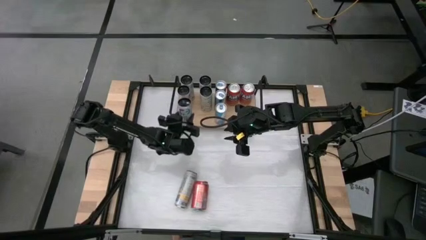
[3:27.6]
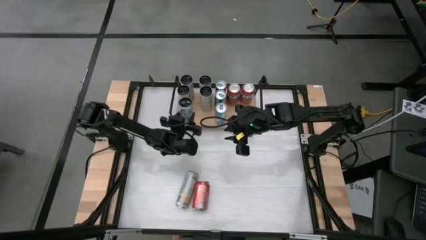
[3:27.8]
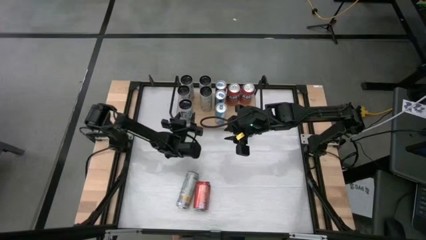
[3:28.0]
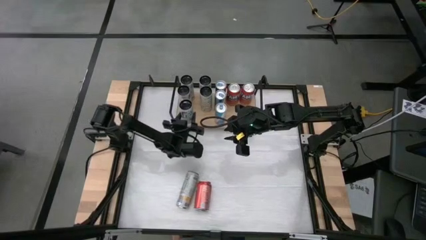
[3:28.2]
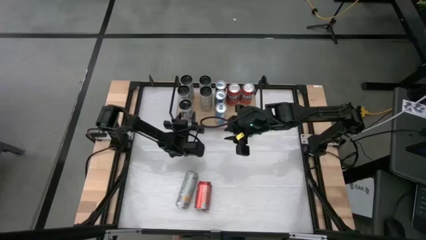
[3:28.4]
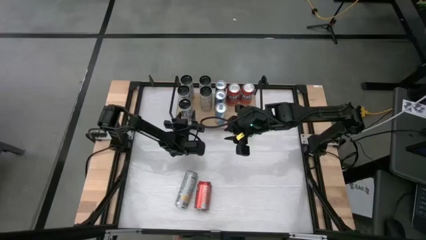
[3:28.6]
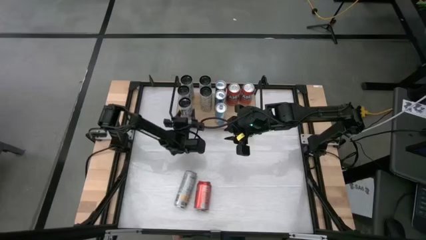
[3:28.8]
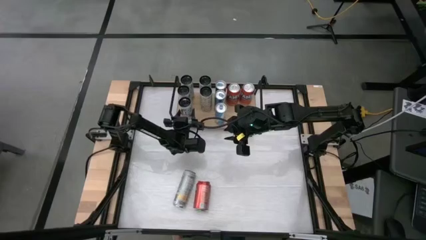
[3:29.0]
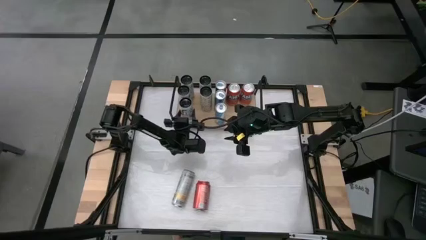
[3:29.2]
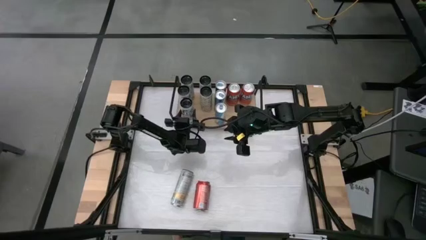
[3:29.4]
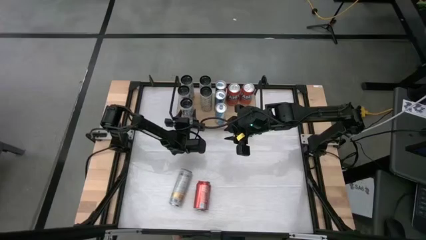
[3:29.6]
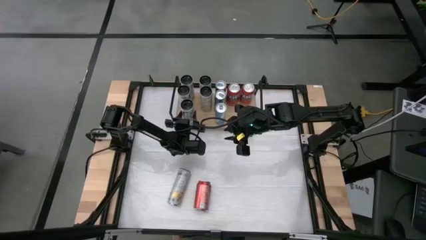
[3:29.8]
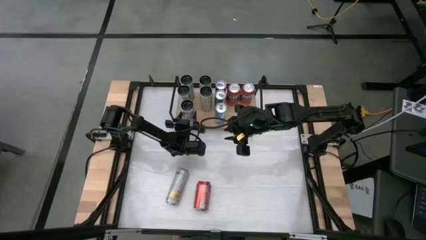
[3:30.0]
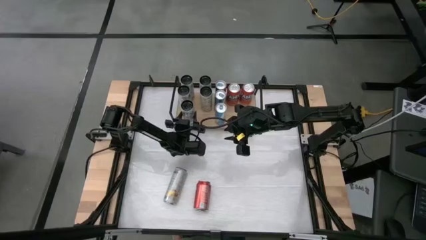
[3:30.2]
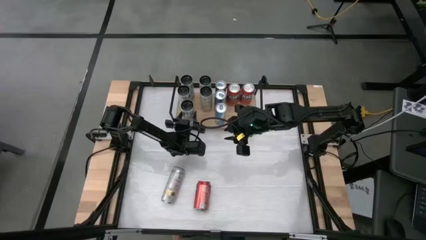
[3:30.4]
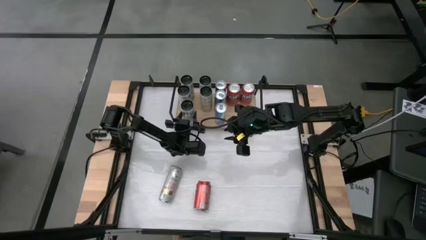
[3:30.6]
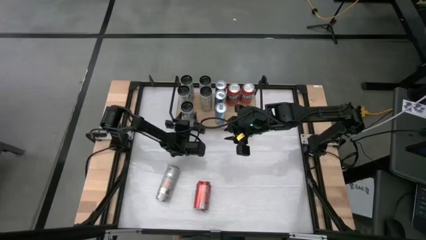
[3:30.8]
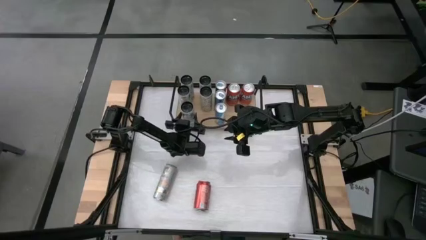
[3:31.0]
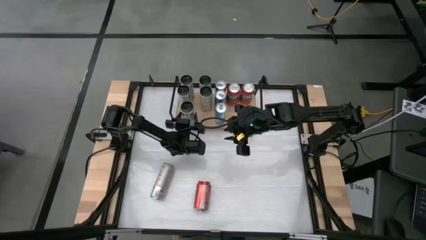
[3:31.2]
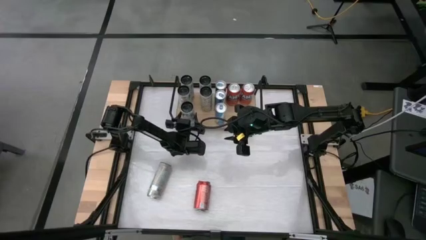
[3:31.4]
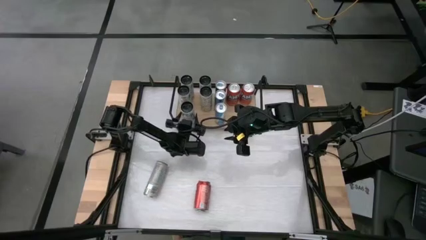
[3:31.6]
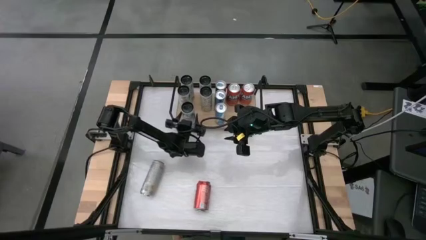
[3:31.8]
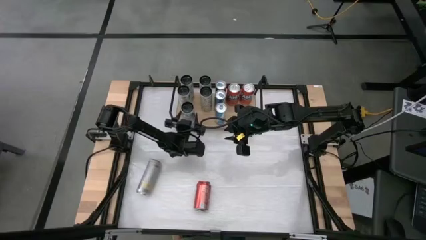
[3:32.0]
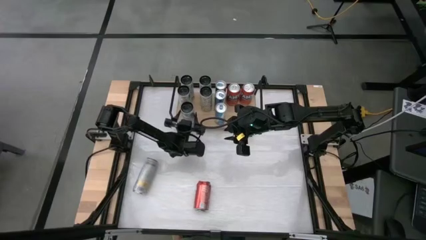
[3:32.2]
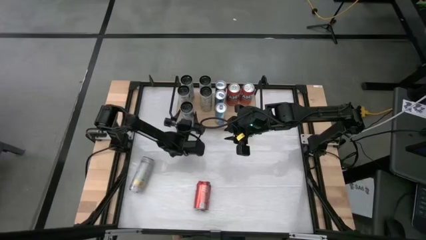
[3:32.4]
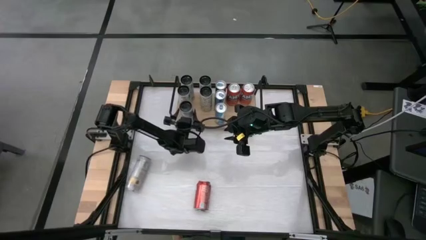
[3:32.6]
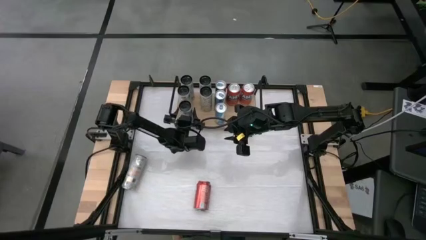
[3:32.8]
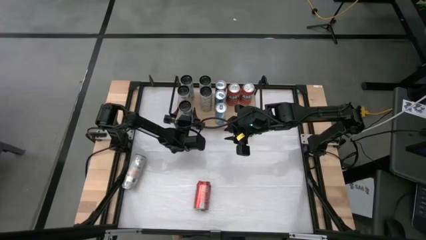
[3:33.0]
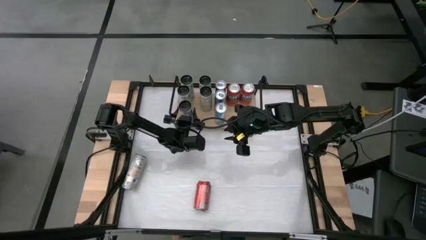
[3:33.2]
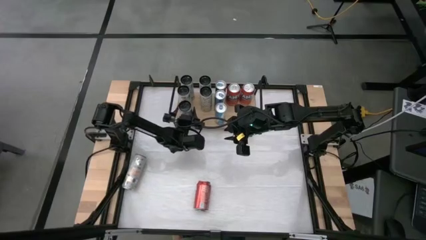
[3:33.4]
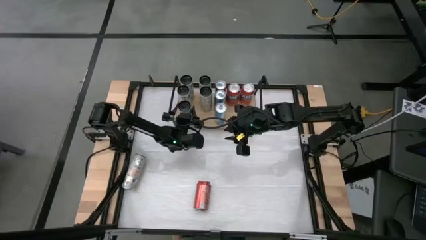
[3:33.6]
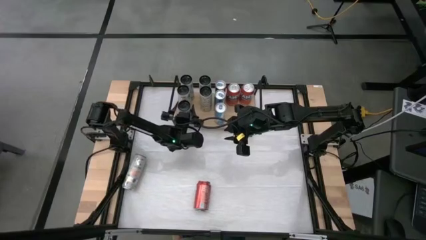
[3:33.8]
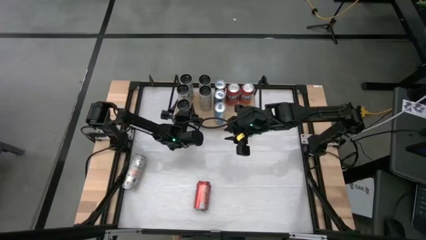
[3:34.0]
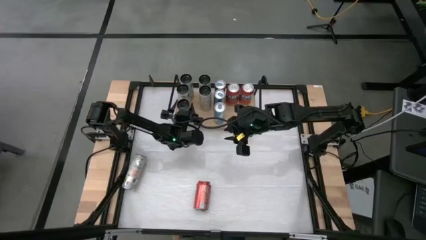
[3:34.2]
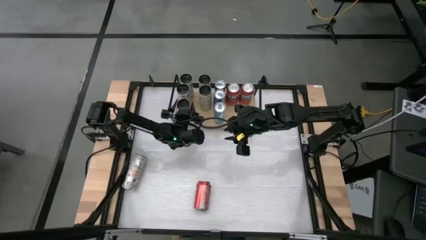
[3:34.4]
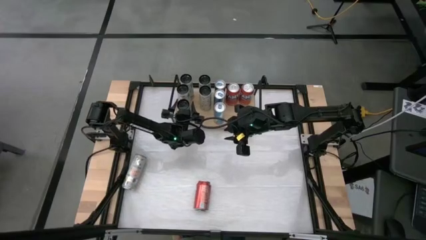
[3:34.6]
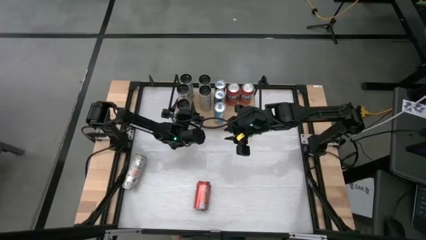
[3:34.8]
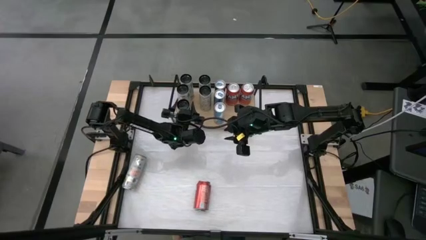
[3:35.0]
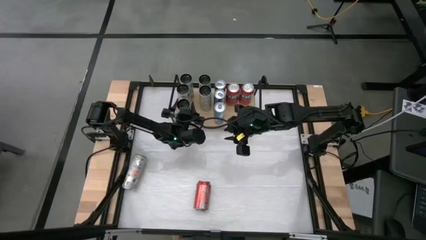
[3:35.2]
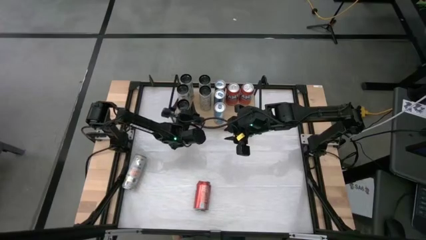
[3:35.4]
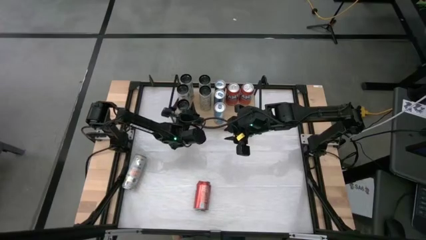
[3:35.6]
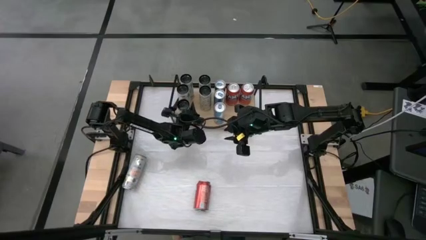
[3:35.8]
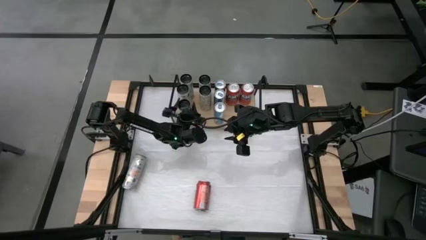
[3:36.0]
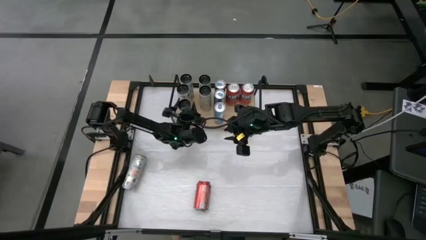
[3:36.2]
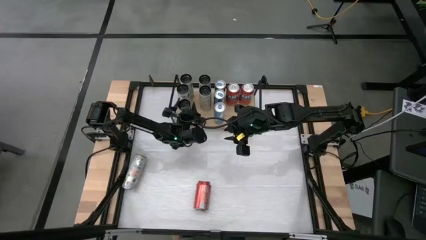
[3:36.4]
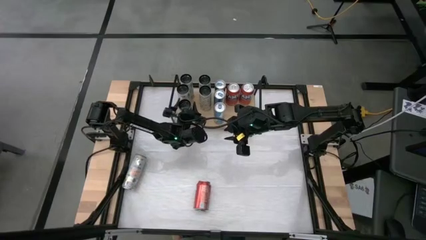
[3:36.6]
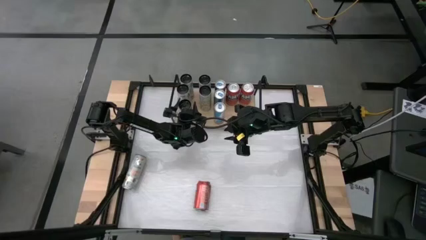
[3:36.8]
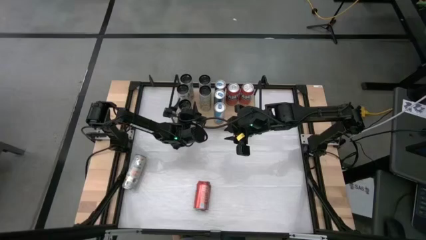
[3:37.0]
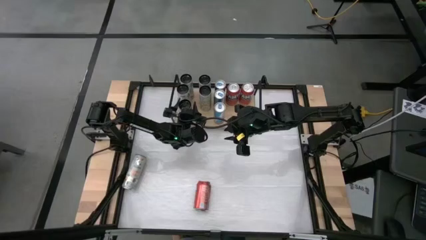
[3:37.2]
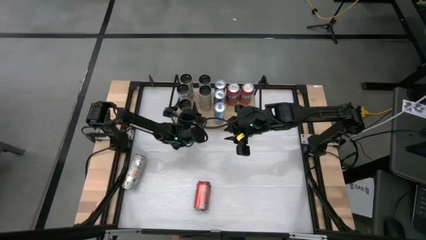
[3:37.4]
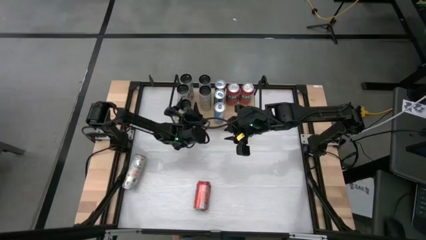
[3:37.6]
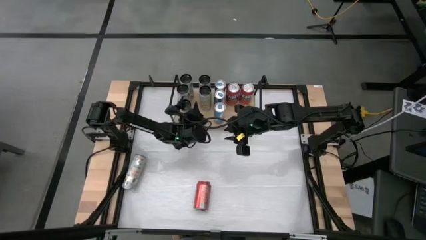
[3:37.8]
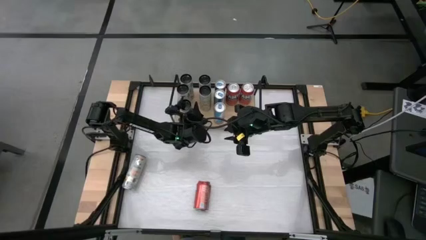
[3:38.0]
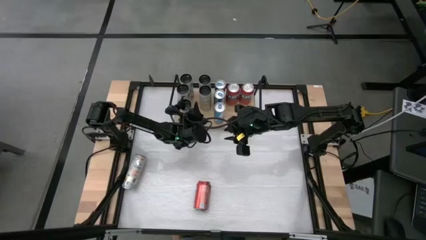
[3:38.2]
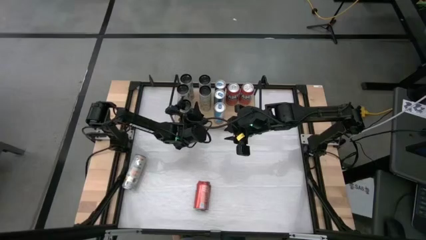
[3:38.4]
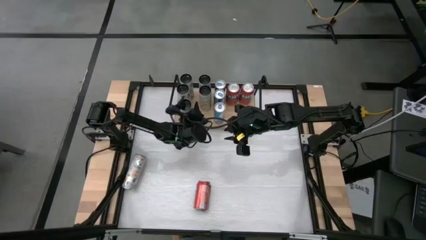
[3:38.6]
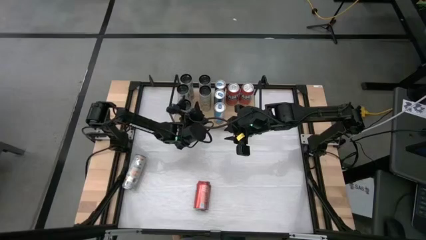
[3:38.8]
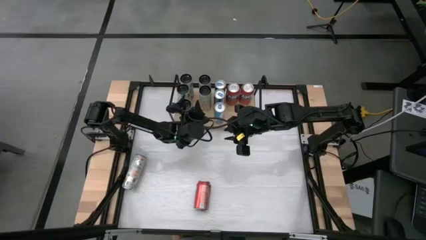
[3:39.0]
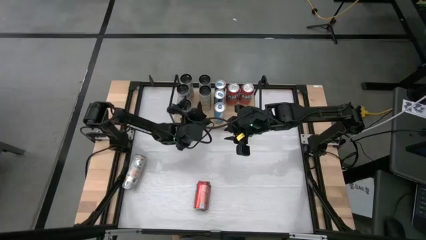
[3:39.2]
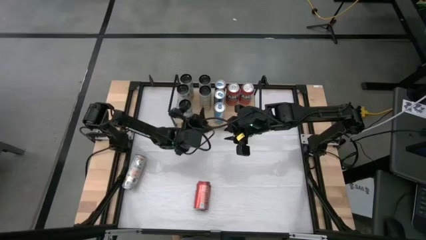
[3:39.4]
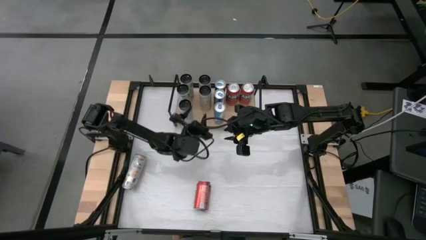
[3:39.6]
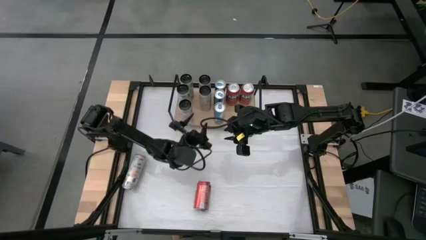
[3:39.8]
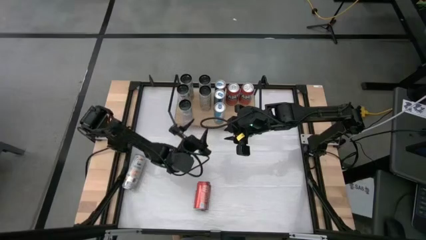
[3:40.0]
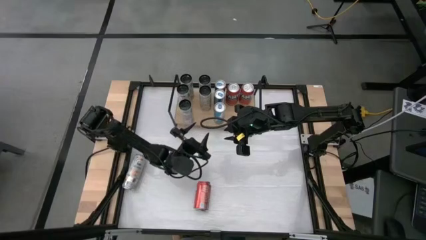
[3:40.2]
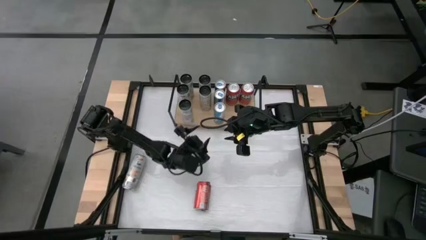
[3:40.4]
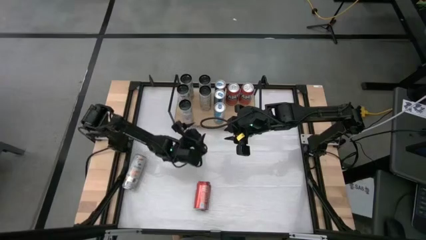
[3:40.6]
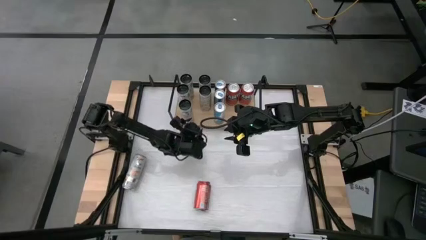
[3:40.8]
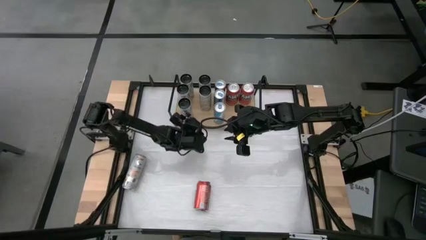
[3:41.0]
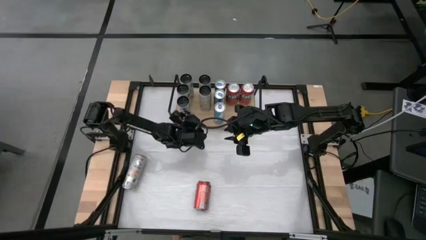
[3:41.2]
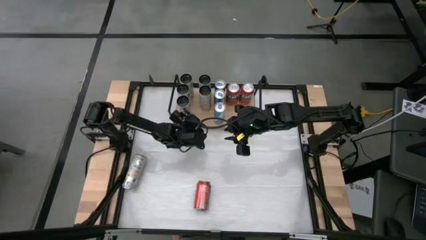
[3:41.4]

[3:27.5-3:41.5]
Task: Place canned beverage on shelf
Put the white pink soda can on the shelf aligned with the other white pink soda cans
